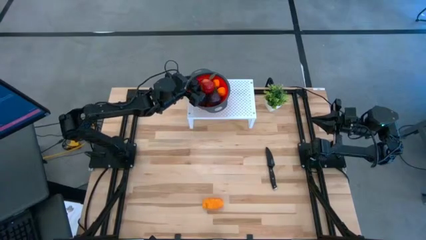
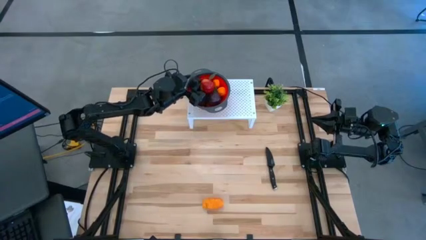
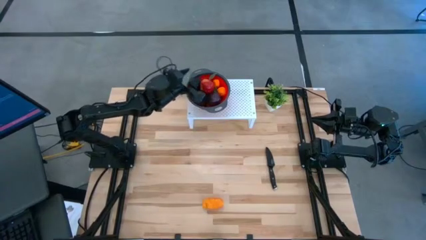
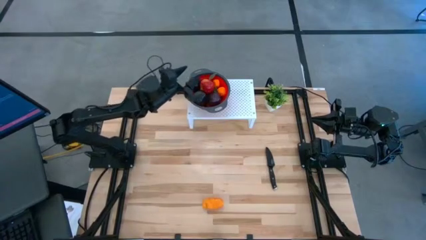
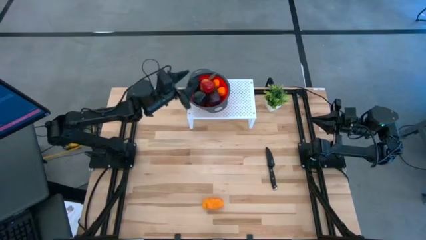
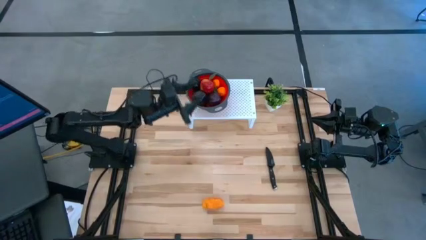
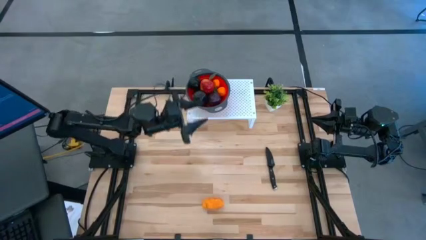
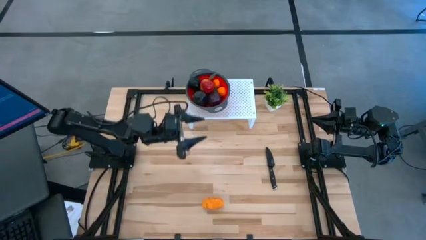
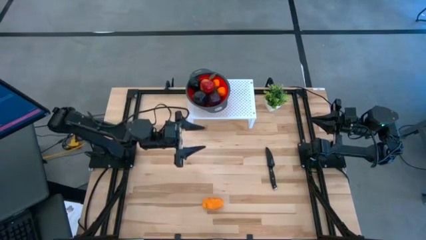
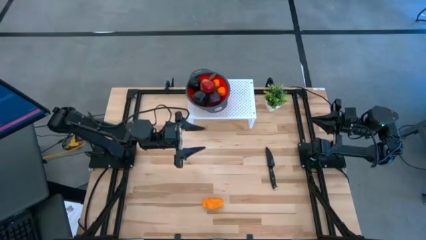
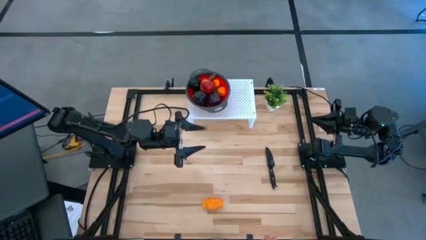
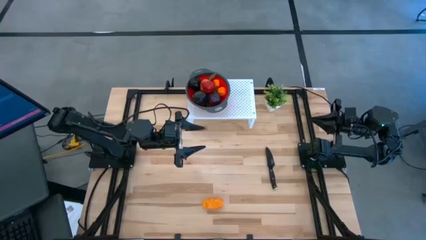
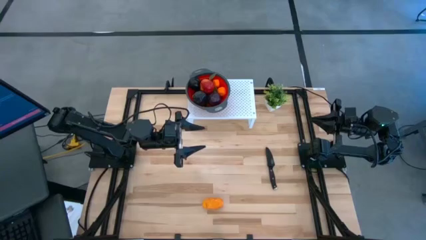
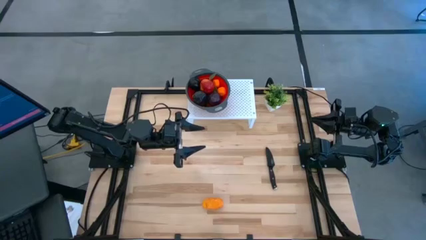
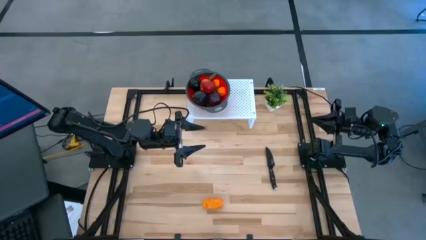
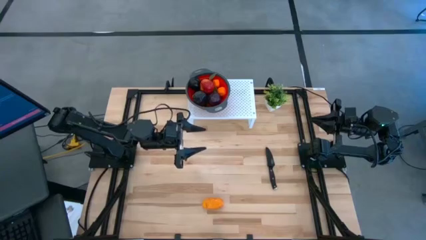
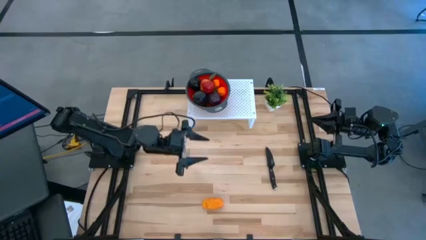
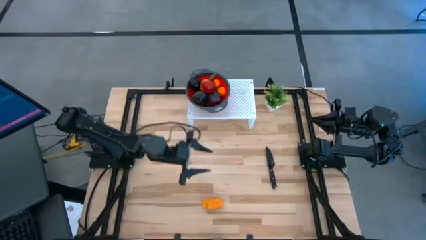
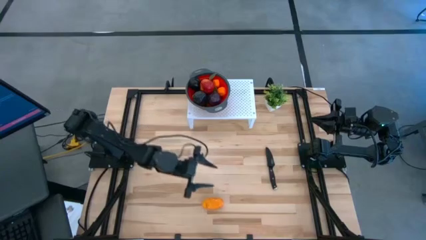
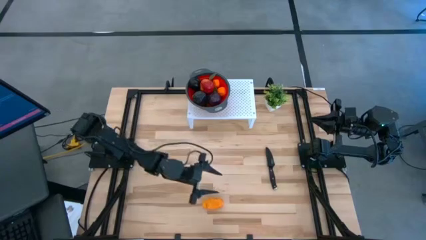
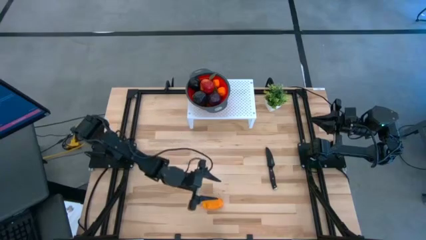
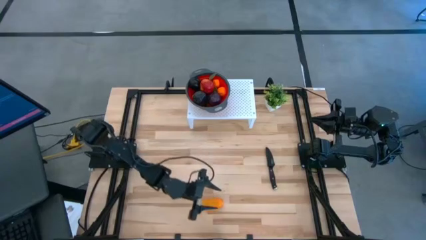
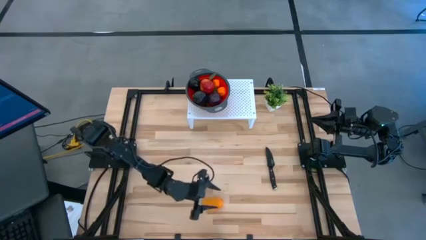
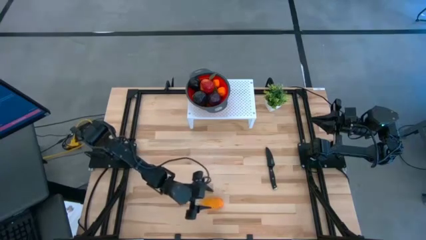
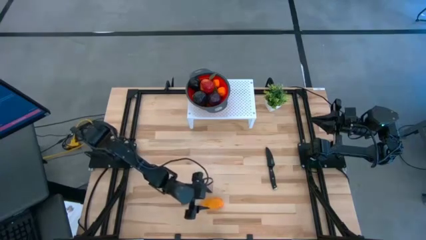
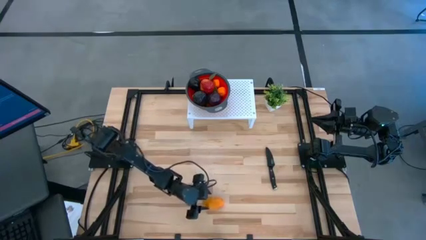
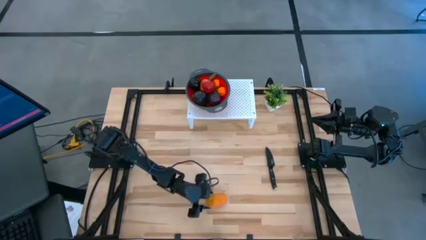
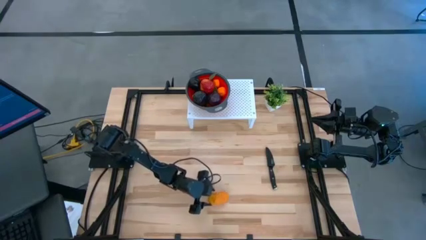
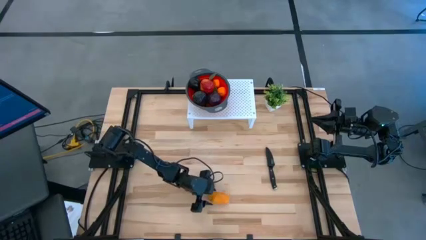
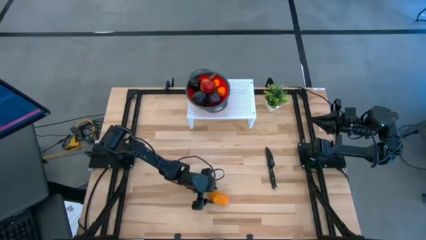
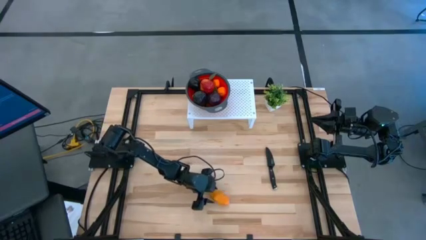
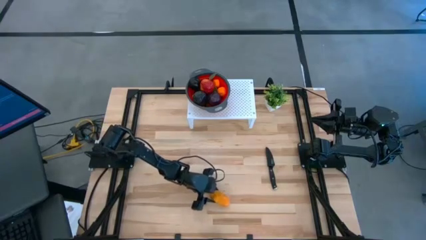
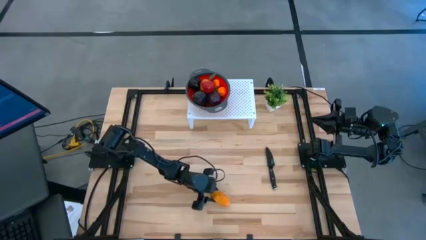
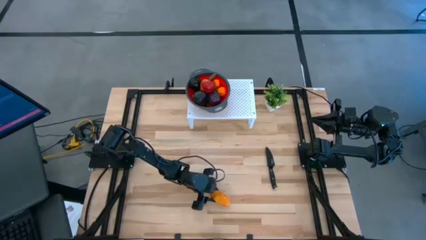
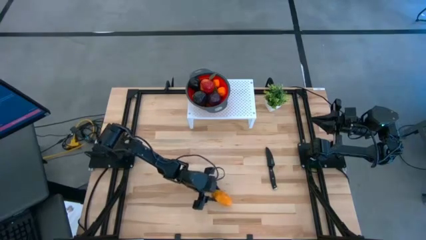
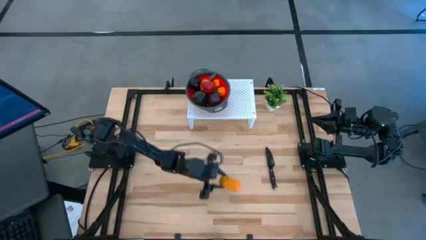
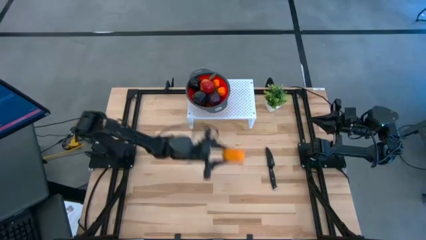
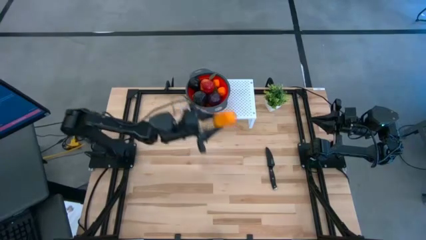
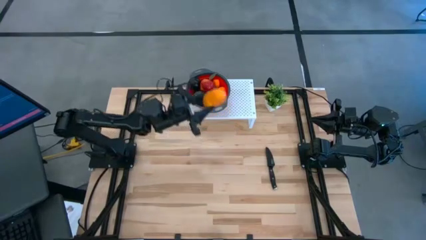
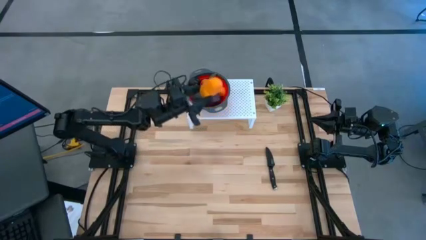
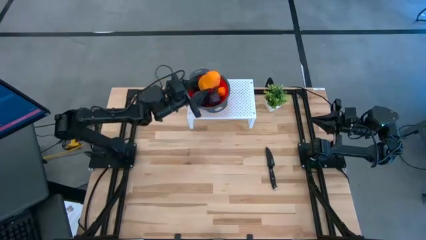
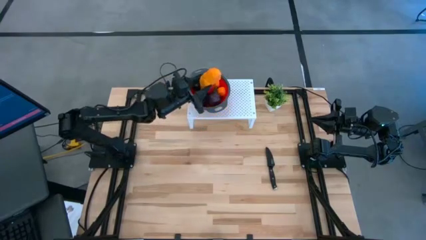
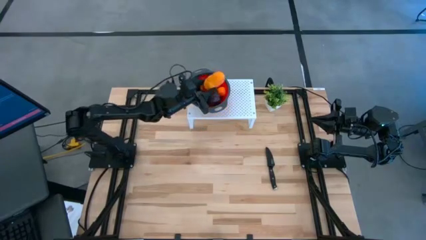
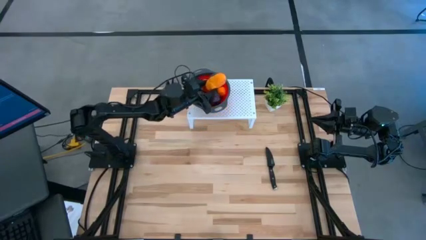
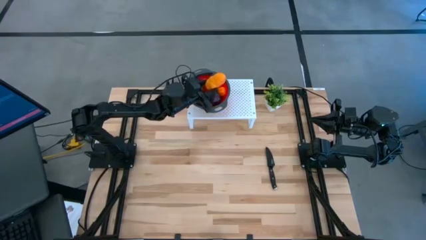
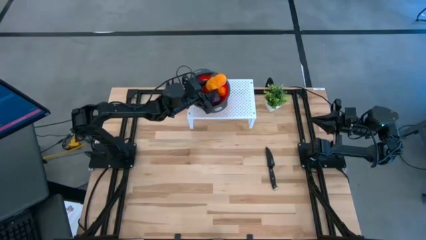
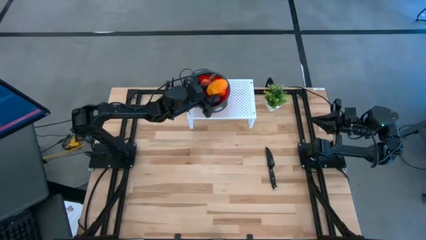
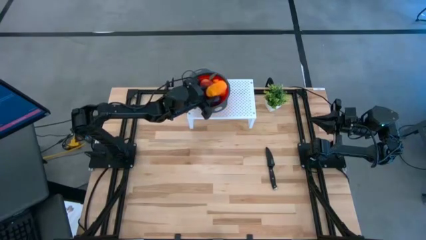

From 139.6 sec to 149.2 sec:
Task: Pick & Place Fruit
Put the mango into the strainer bowl on the shelf

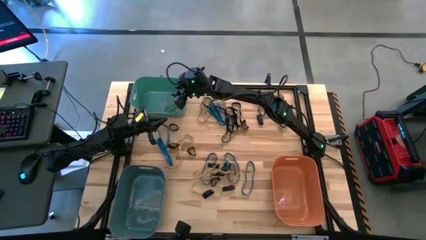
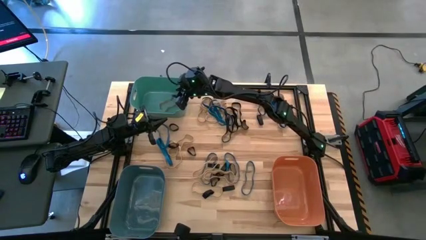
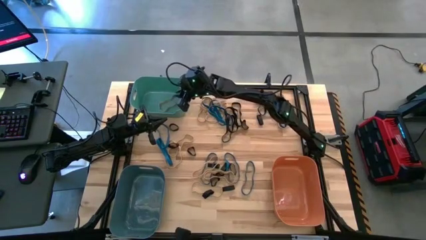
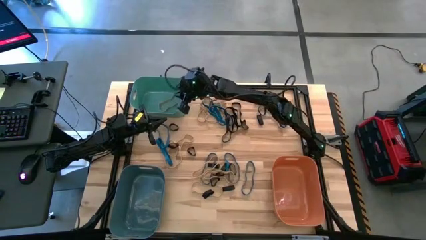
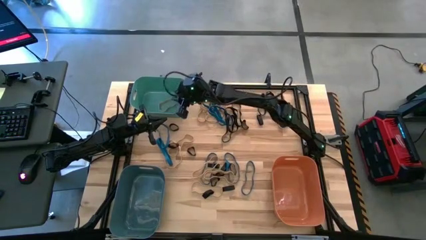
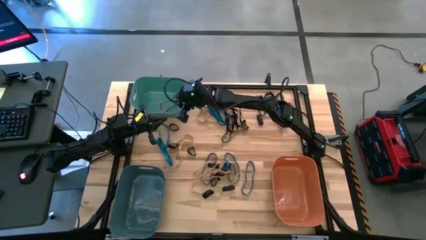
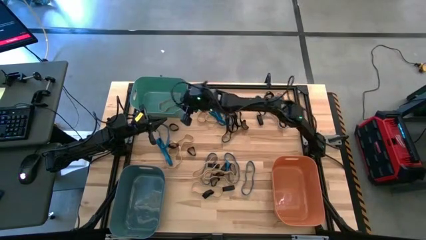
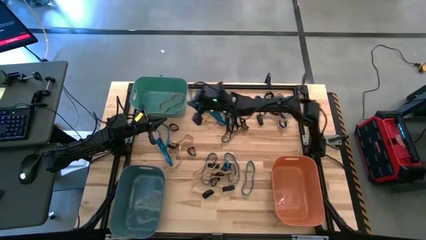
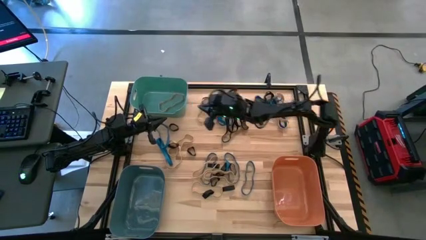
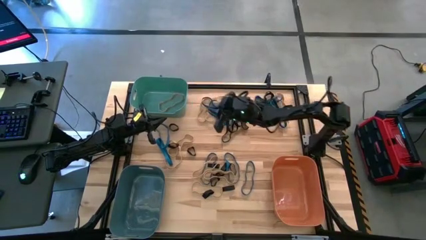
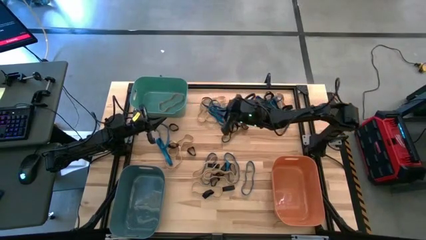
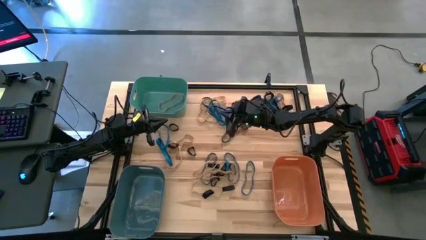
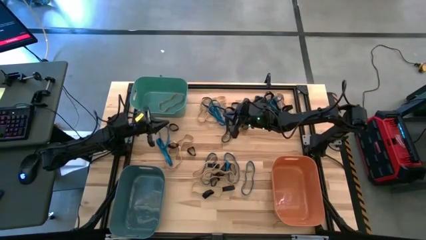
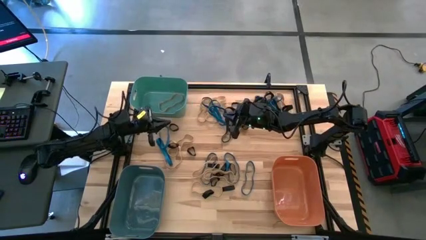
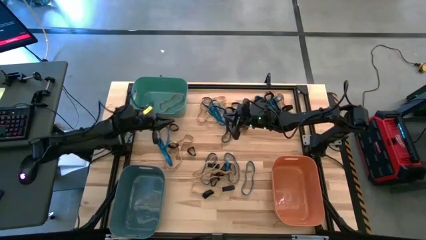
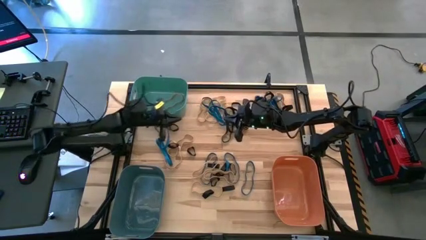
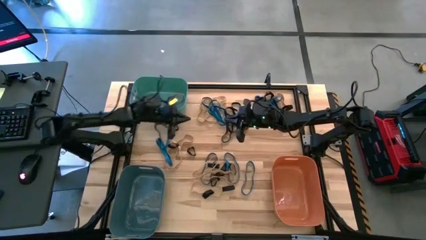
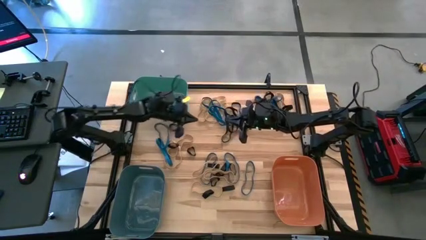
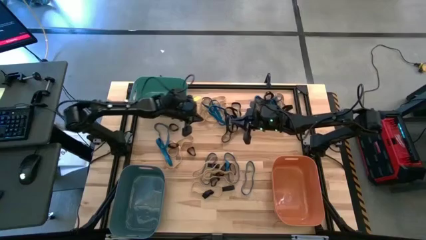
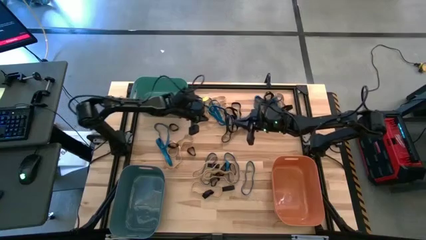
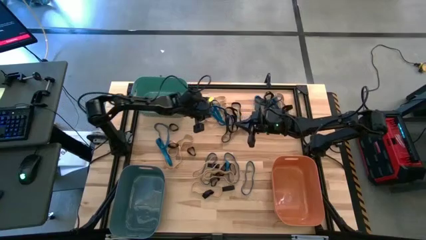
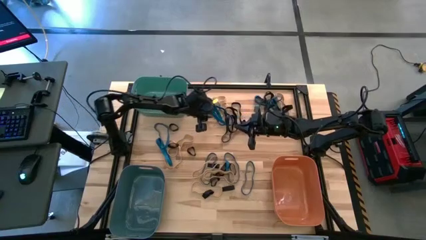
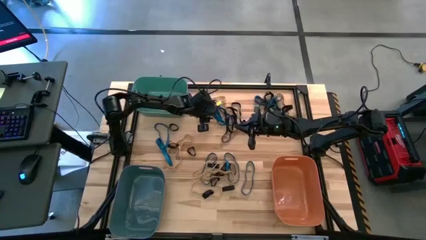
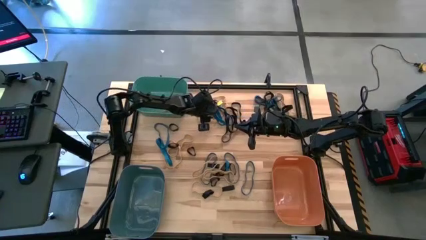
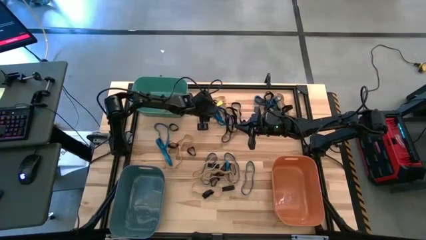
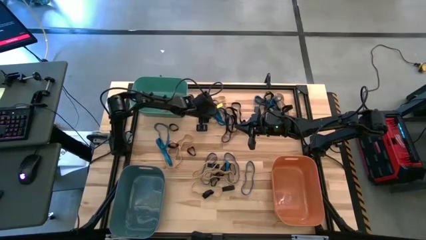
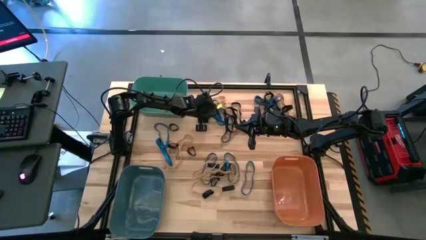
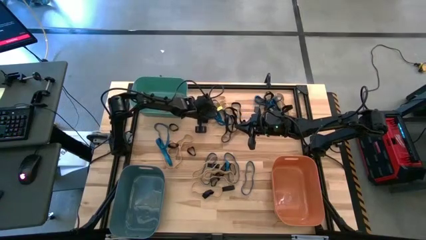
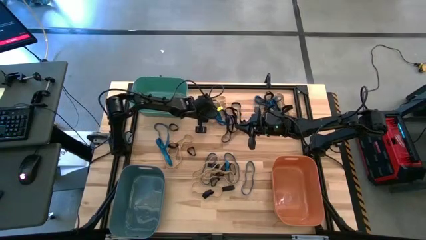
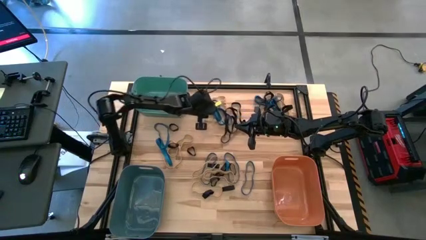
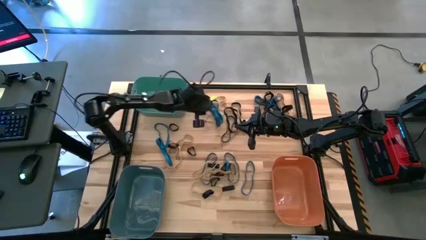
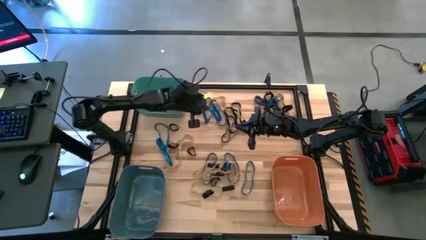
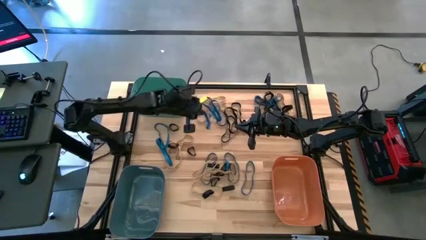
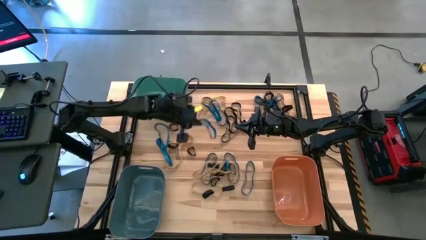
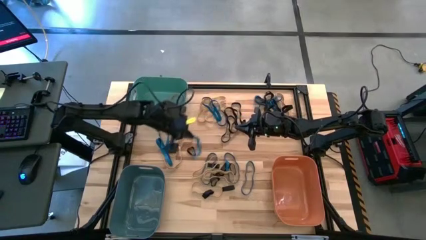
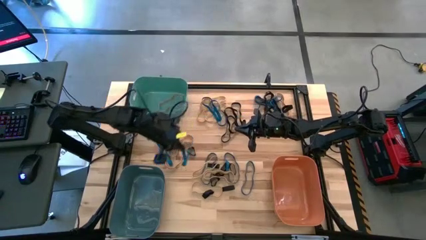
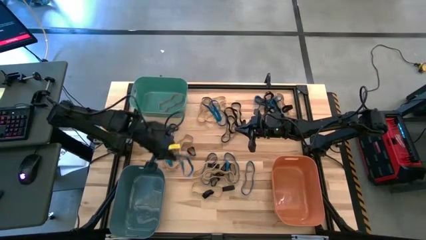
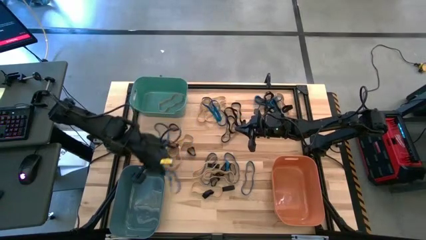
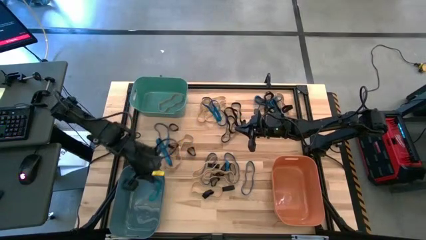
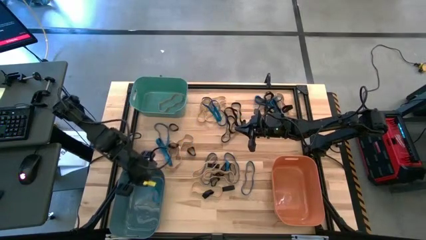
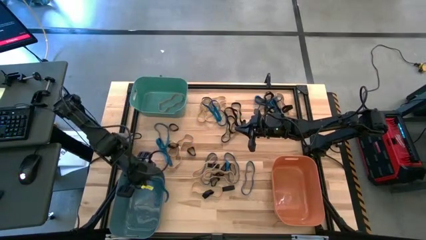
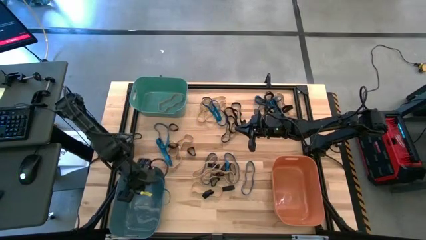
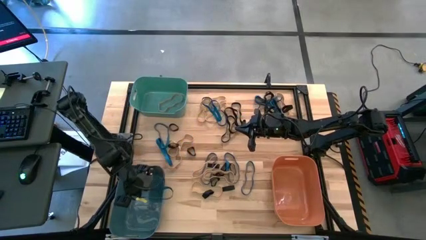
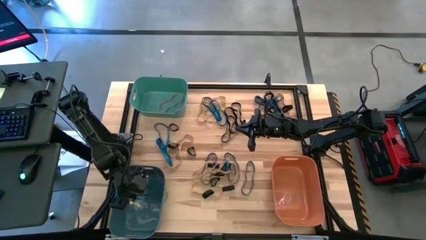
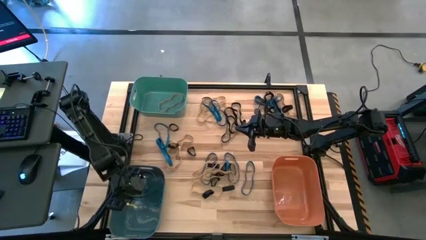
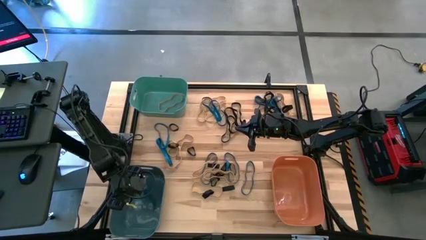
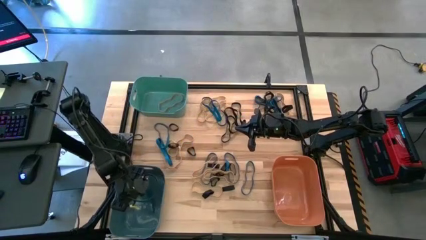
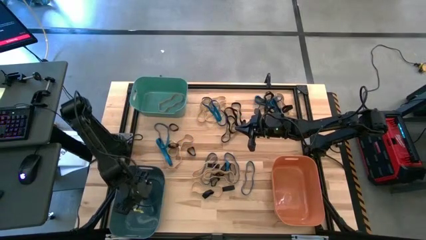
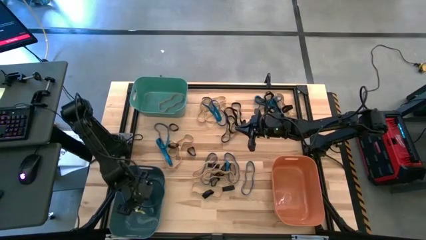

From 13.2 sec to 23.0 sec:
Task: Sort rubber bands into baskets
Put the blue rubber band into the blue bin
